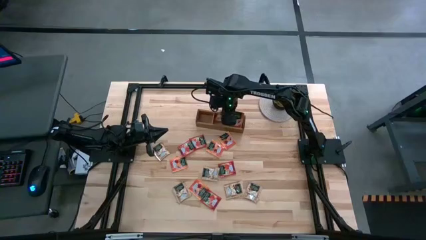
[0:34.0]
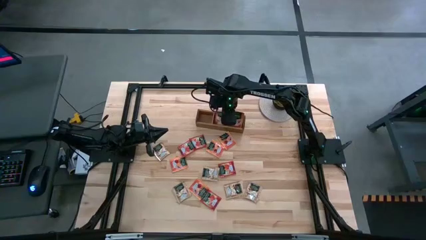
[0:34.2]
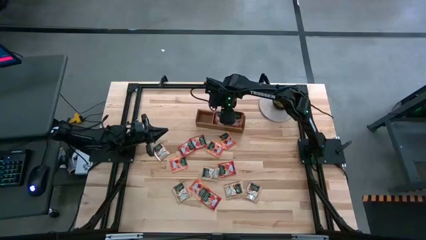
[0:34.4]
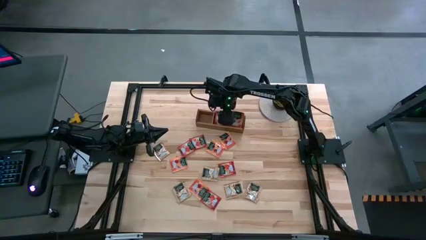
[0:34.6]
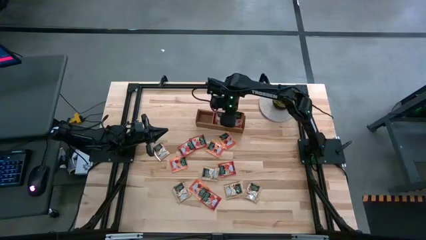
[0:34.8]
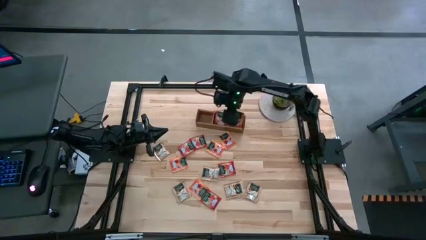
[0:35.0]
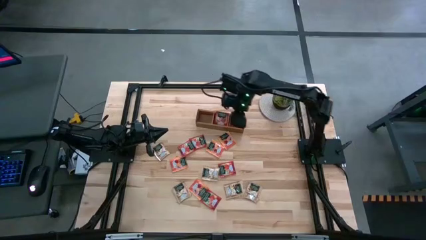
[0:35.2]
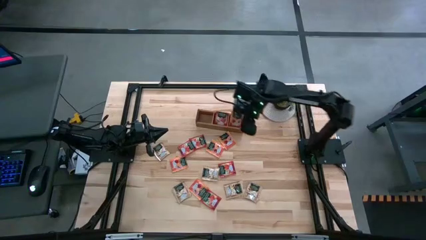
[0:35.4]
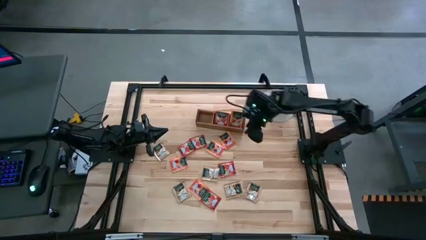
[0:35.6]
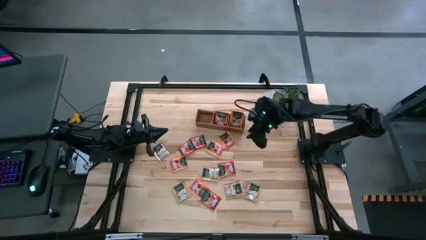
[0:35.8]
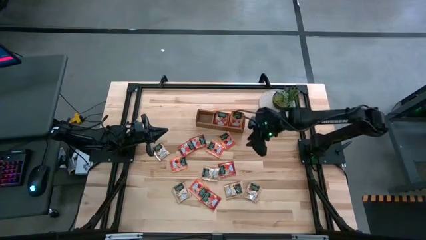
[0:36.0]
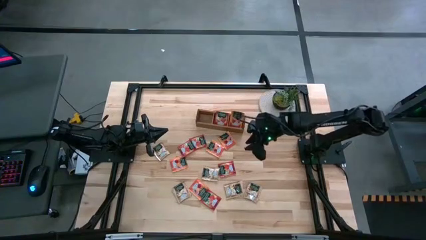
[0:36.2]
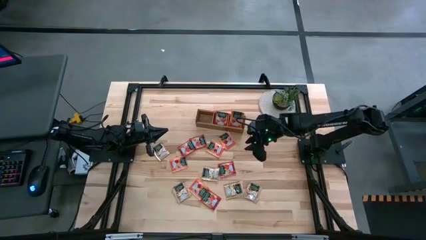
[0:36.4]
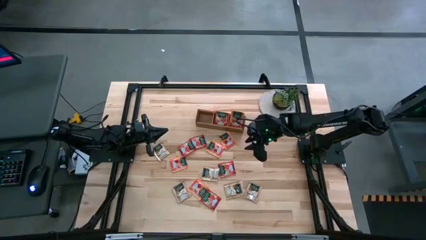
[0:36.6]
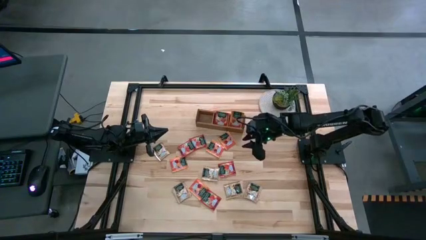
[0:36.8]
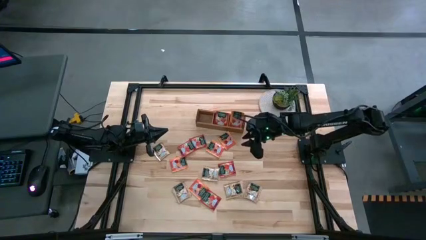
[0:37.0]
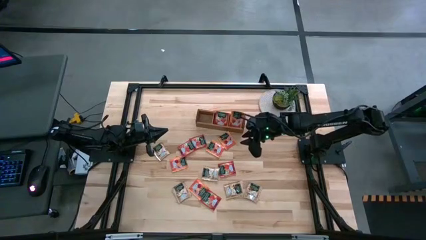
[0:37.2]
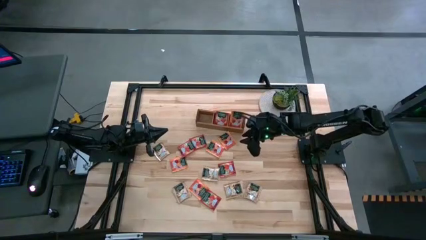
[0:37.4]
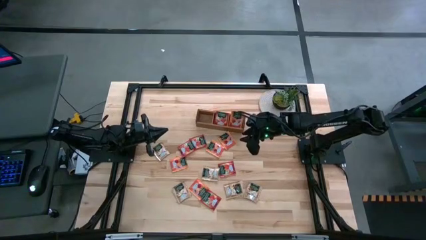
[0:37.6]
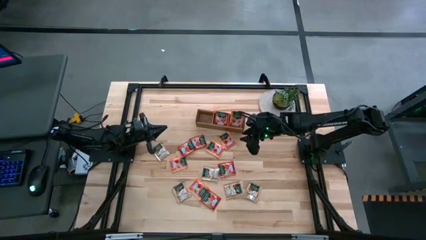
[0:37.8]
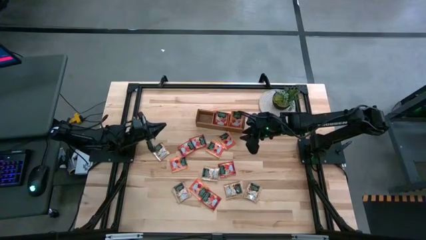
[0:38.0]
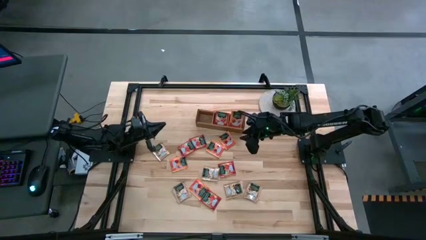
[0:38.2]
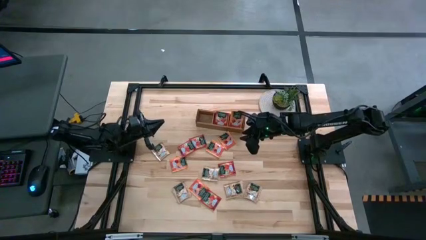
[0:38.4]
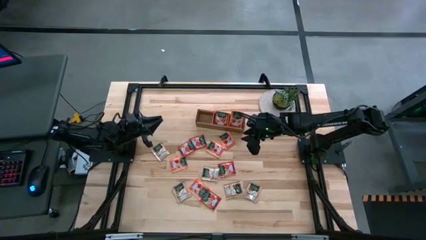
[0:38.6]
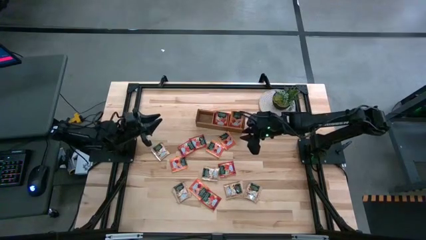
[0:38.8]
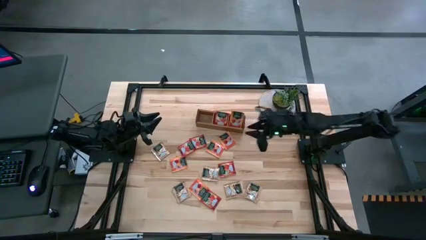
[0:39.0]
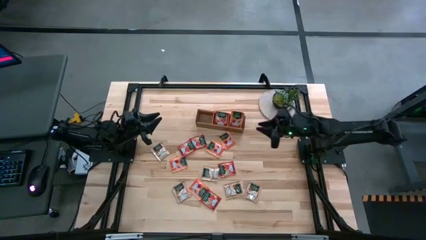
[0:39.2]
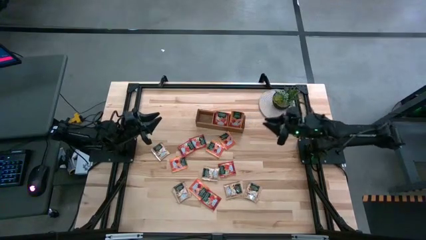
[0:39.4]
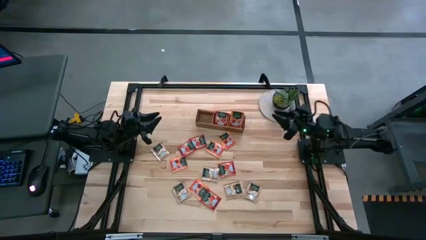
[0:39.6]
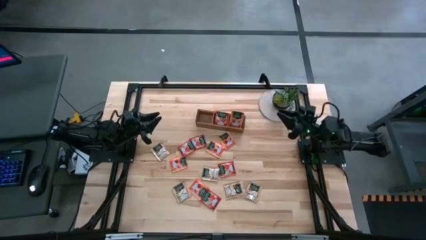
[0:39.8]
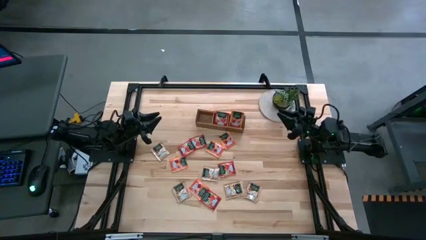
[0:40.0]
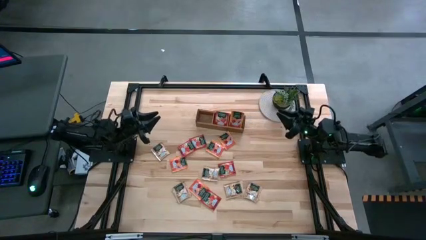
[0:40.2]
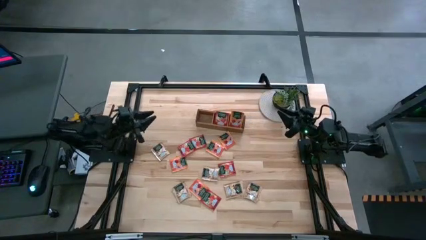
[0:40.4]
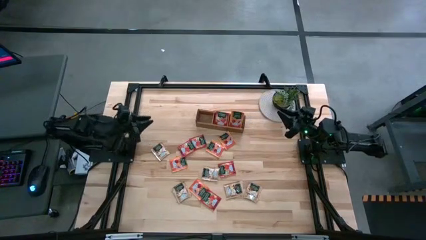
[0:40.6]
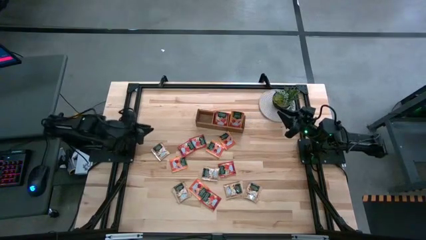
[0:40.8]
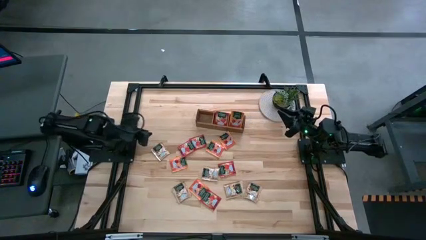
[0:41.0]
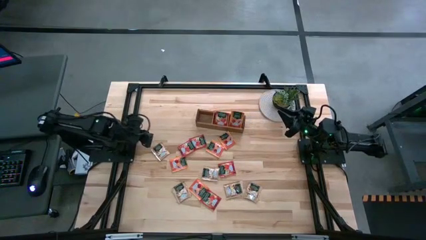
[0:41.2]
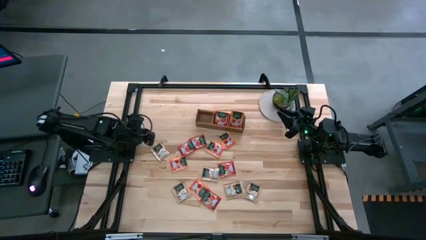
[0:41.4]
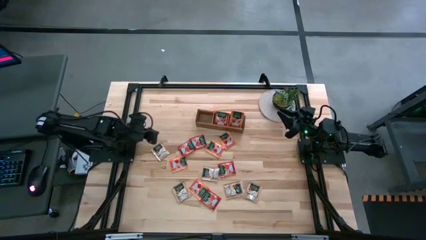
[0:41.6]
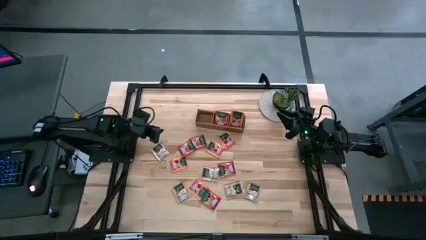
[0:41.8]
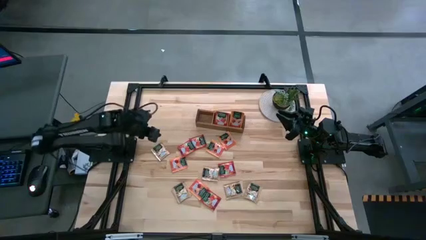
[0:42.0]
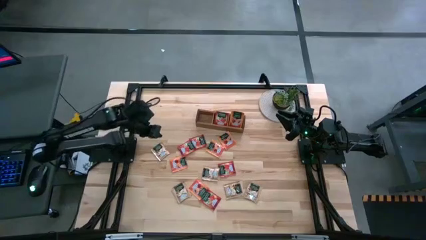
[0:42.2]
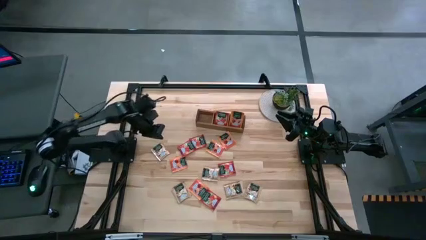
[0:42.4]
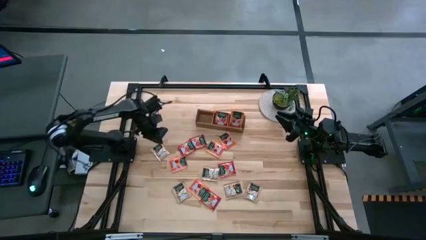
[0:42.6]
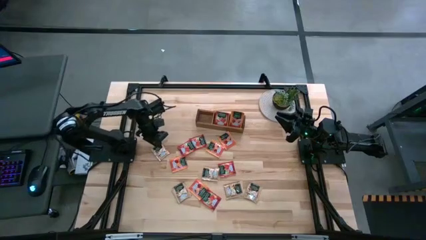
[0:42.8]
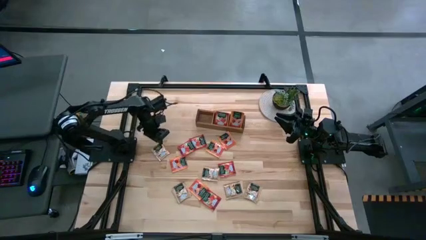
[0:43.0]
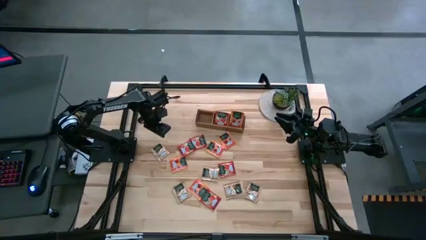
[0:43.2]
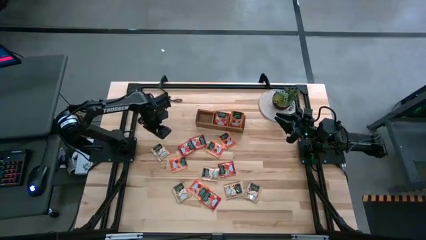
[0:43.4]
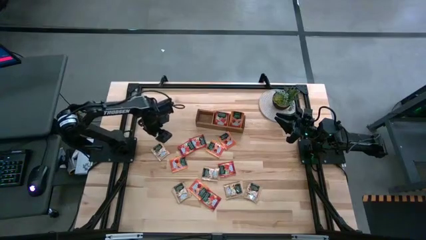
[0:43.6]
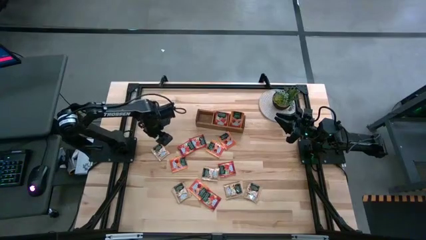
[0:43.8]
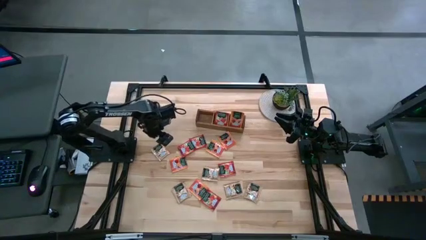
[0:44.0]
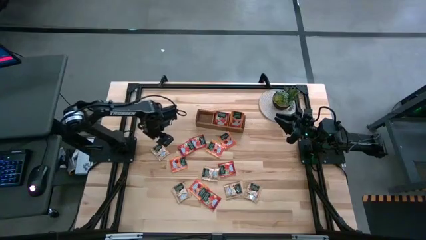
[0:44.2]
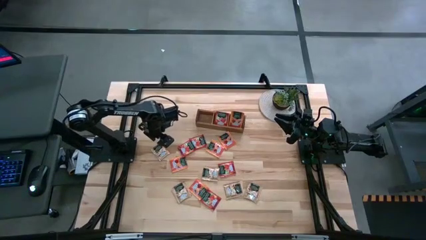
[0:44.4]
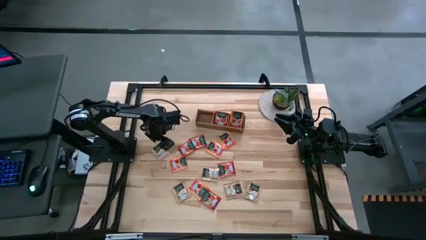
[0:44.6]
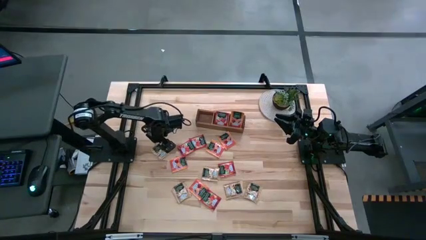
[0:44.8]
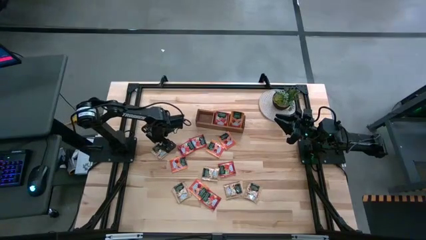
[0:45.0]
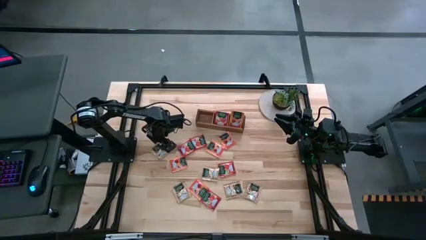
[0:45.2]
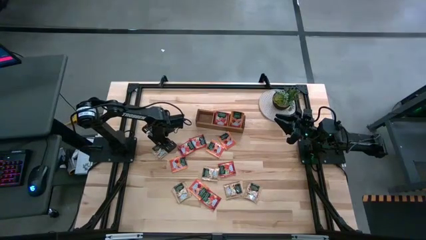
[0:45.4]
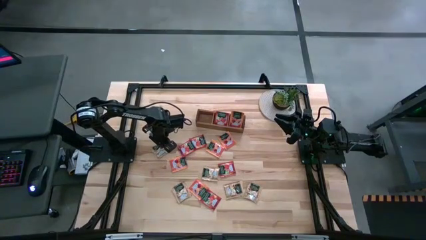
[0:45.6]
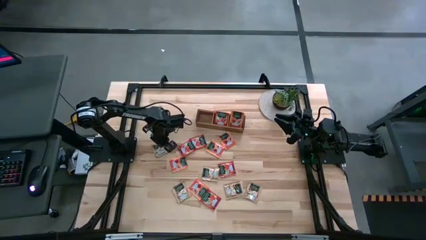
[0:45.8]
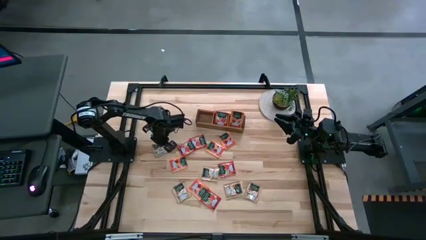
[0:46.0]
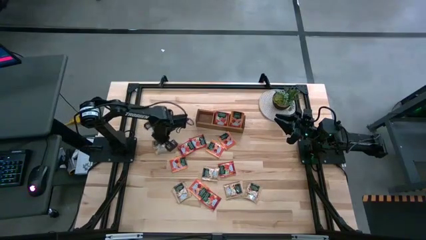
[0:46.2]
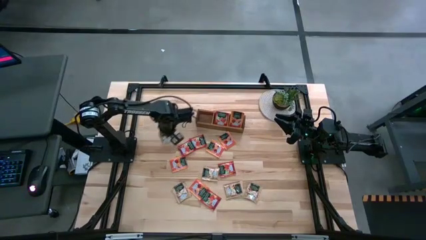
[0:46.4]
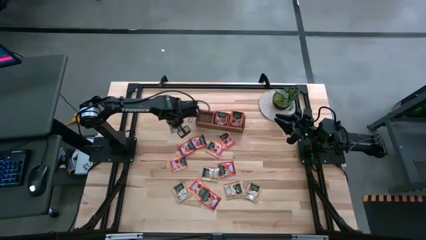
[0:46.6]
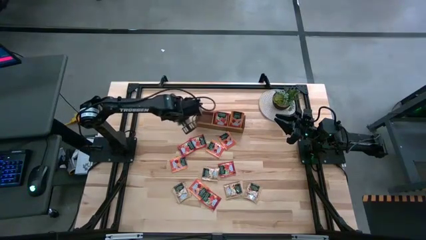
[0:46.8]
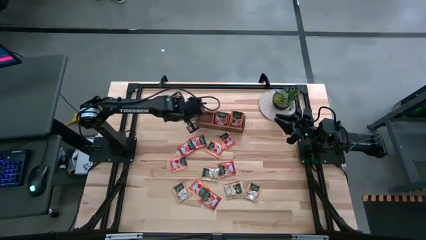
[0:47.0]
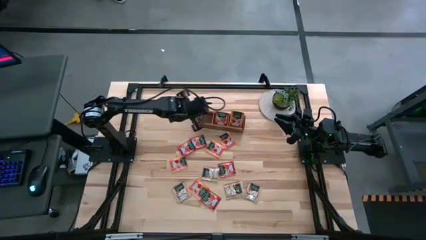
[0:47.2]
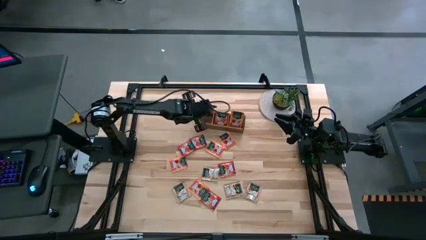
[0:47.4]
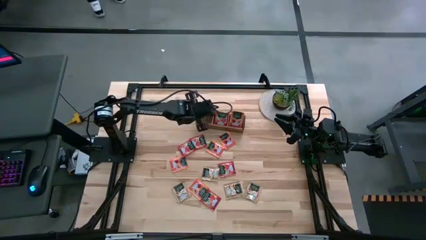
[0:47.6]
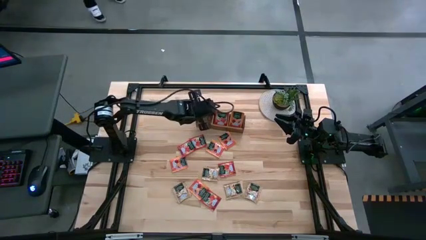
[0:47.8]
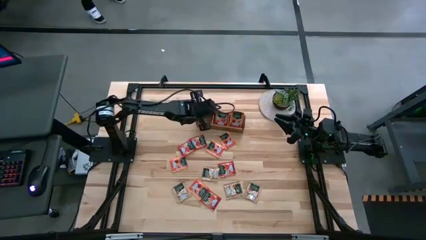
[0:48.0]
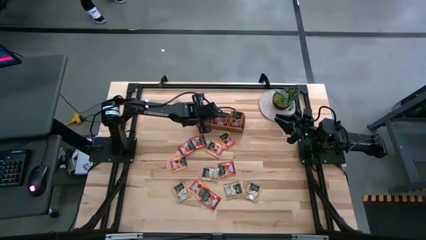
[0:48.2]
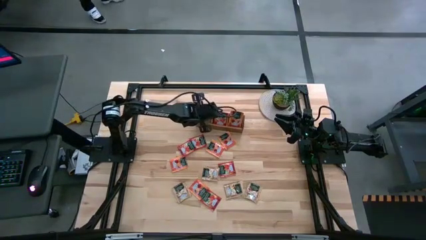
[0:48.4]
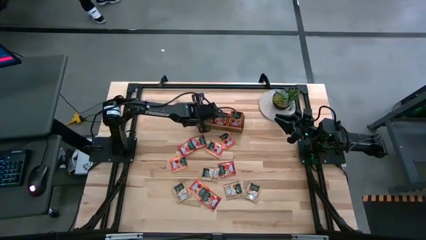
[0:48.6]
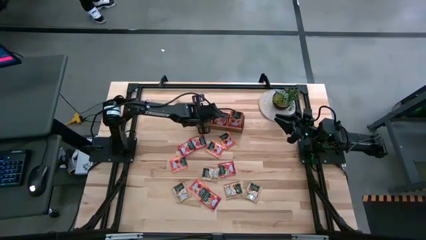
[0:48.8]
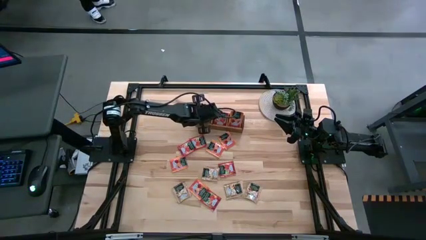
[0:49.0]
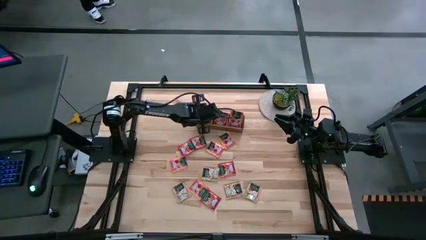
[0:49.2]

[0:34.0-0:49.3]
Task: Pick & Place Tea
Put the brown tea bag into the left section of the wooden organizer
